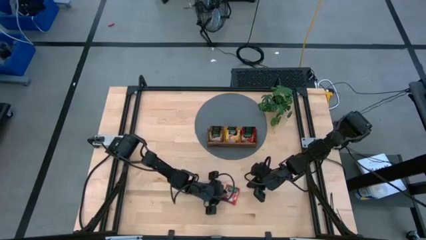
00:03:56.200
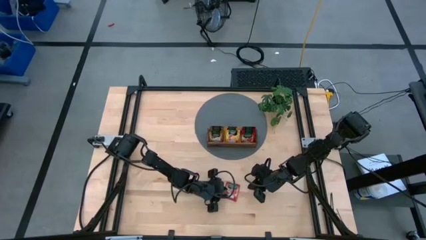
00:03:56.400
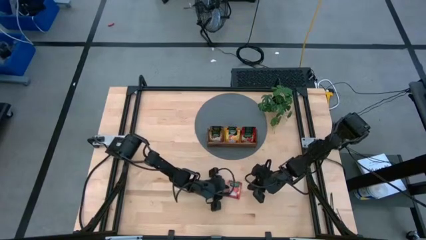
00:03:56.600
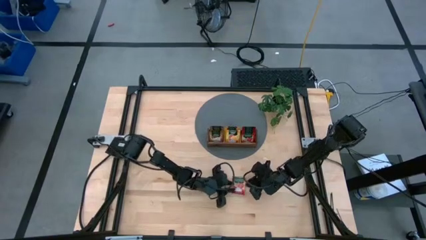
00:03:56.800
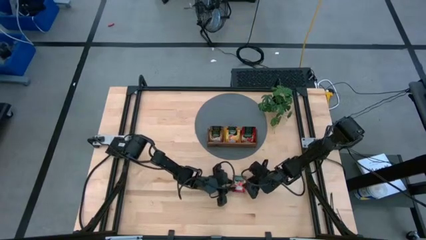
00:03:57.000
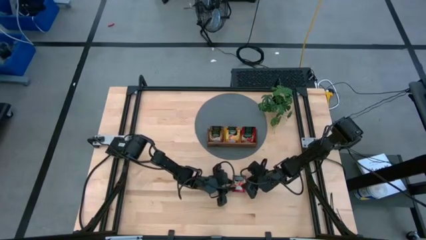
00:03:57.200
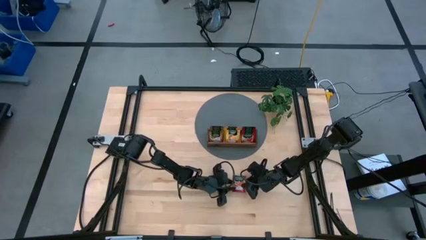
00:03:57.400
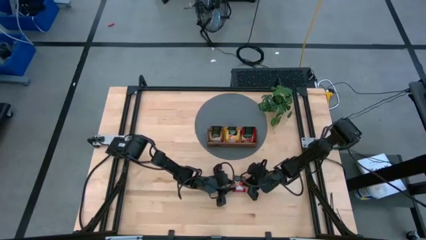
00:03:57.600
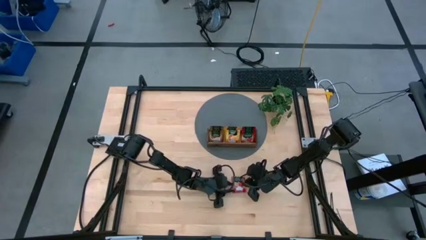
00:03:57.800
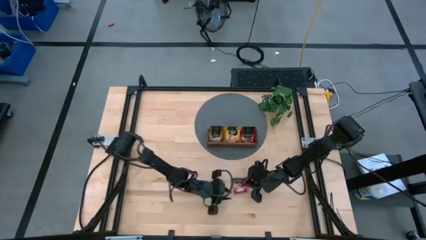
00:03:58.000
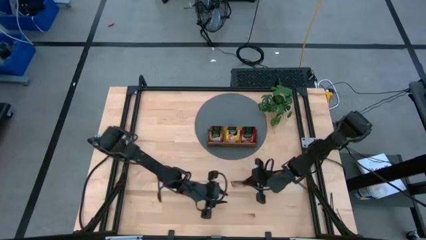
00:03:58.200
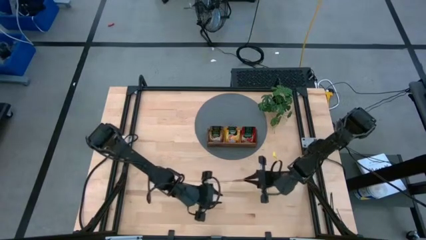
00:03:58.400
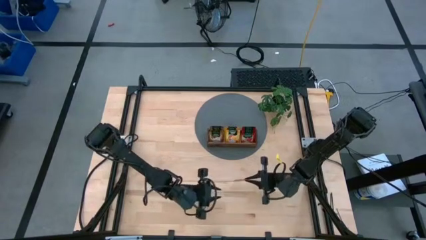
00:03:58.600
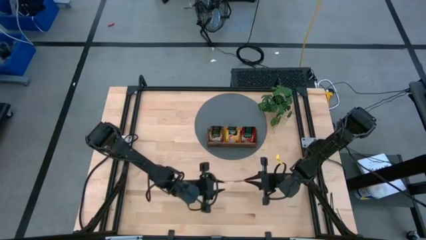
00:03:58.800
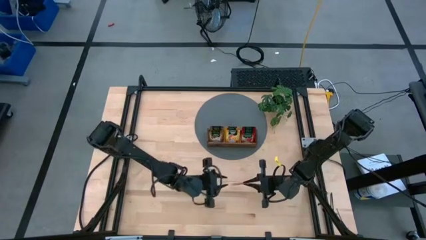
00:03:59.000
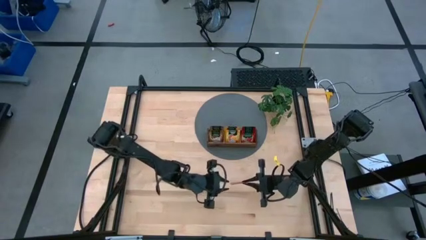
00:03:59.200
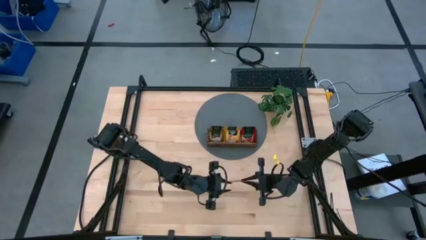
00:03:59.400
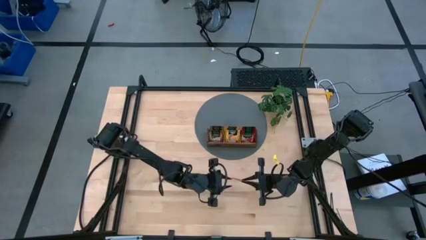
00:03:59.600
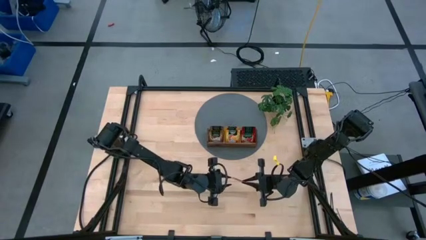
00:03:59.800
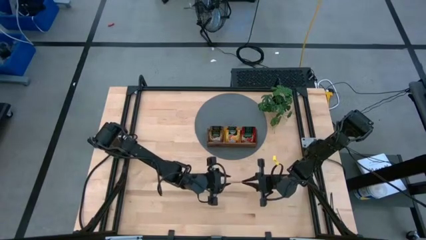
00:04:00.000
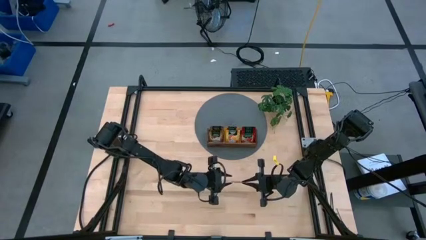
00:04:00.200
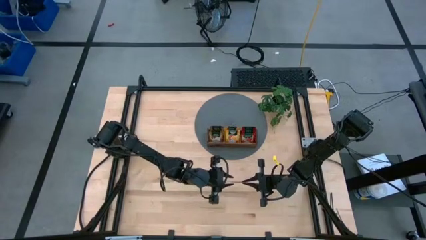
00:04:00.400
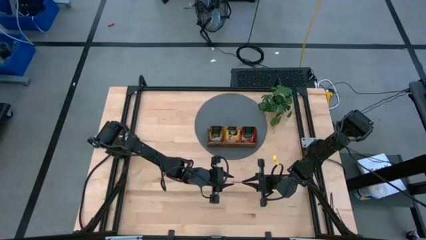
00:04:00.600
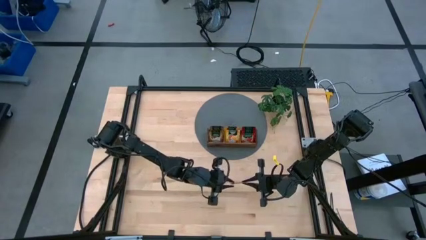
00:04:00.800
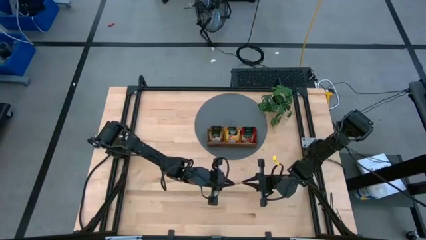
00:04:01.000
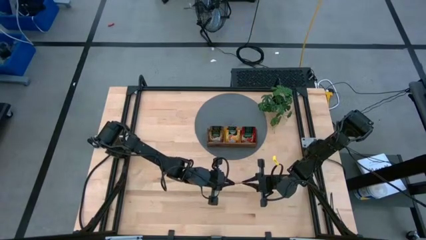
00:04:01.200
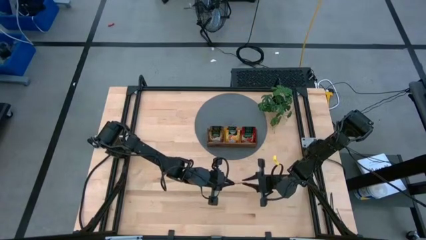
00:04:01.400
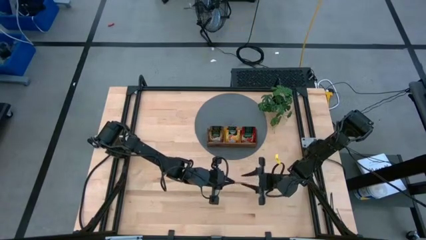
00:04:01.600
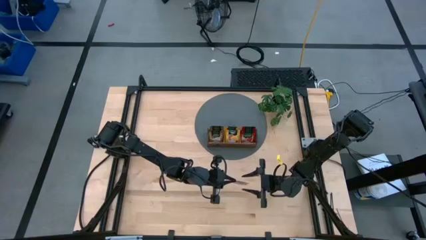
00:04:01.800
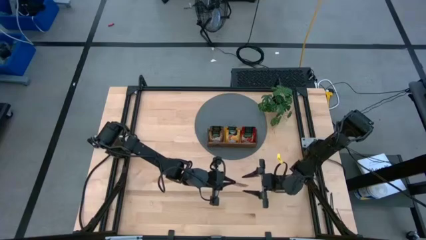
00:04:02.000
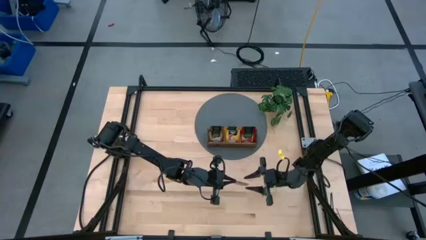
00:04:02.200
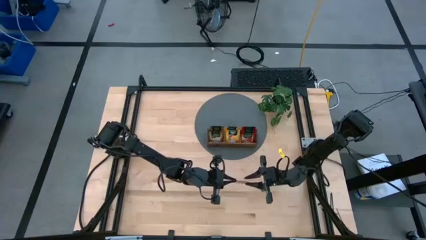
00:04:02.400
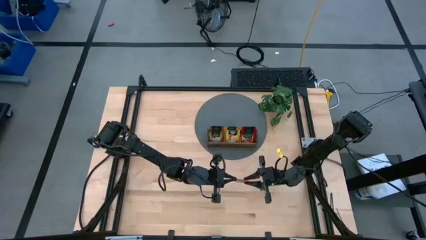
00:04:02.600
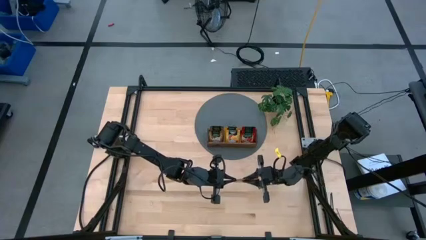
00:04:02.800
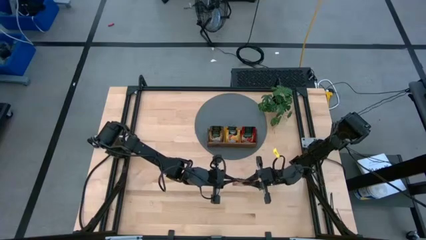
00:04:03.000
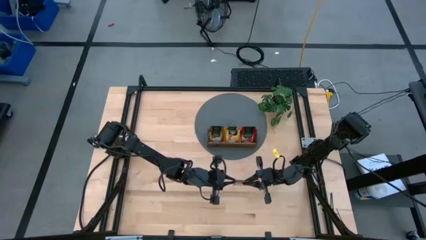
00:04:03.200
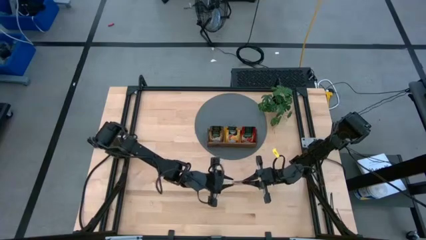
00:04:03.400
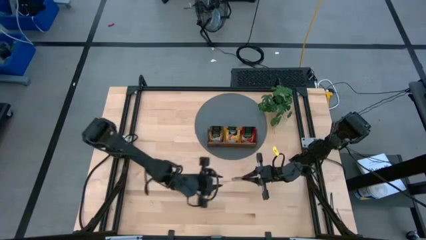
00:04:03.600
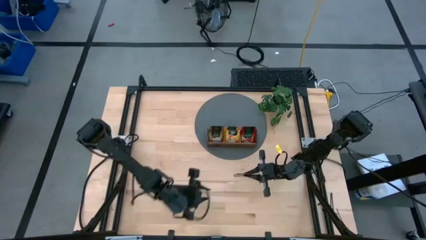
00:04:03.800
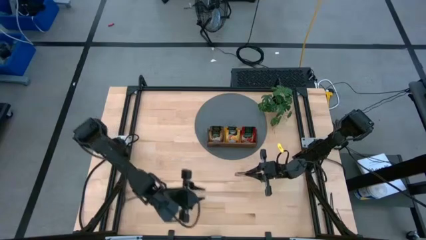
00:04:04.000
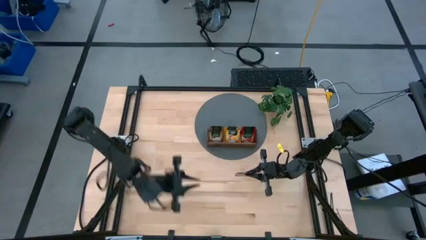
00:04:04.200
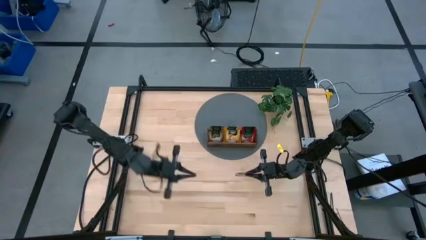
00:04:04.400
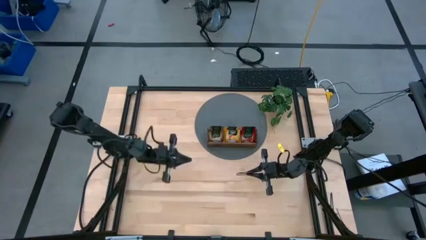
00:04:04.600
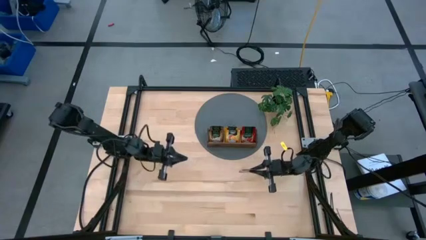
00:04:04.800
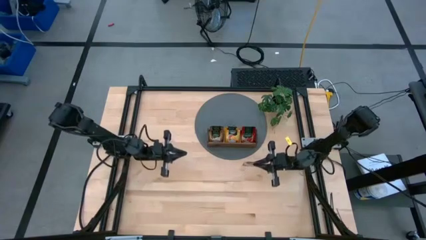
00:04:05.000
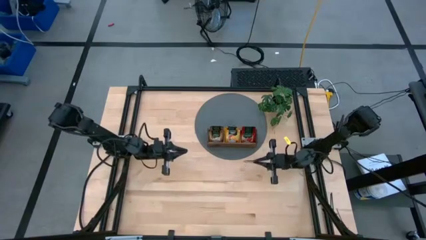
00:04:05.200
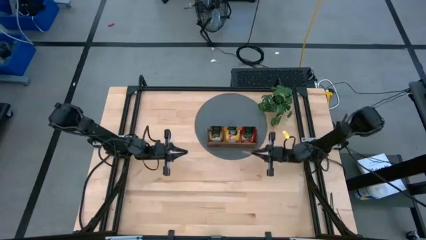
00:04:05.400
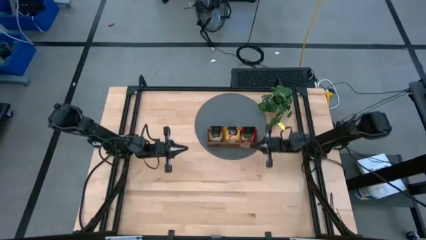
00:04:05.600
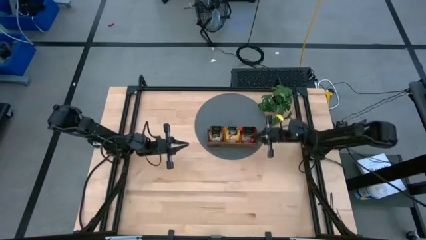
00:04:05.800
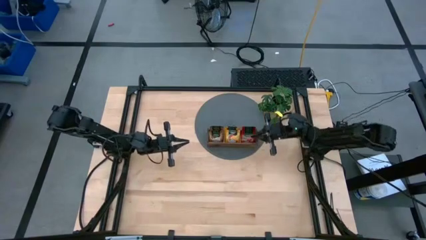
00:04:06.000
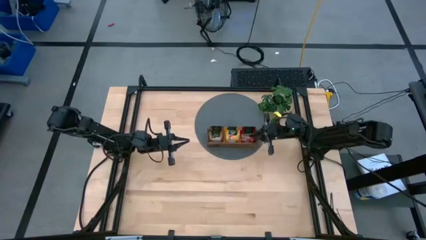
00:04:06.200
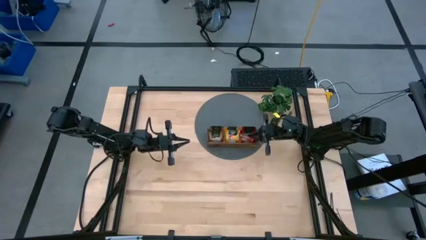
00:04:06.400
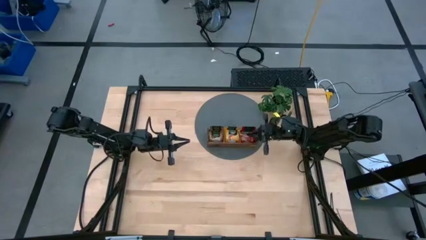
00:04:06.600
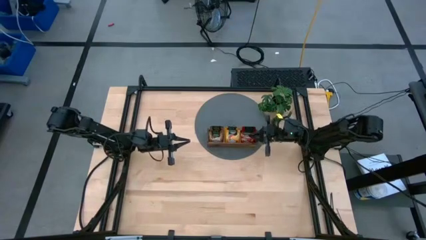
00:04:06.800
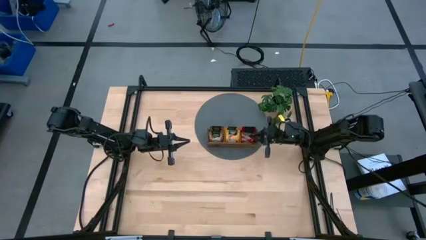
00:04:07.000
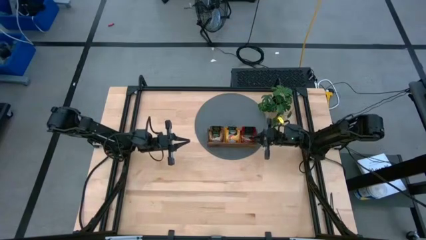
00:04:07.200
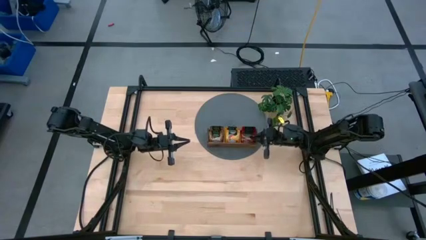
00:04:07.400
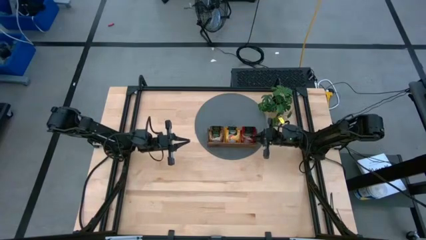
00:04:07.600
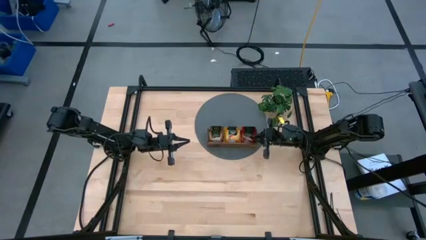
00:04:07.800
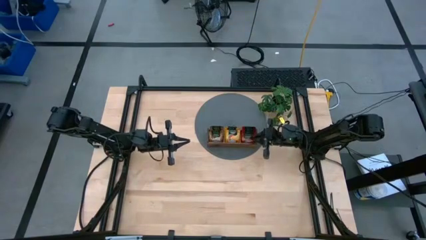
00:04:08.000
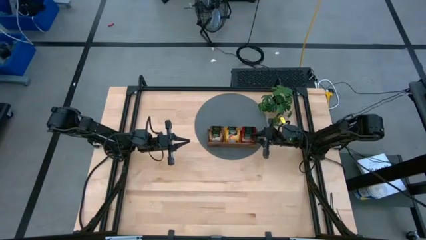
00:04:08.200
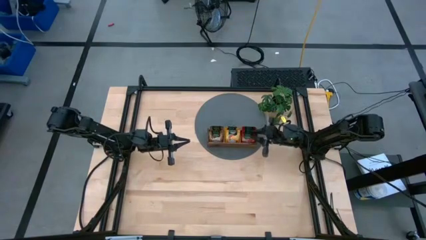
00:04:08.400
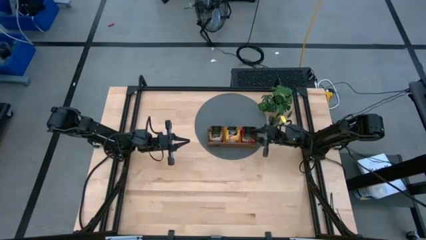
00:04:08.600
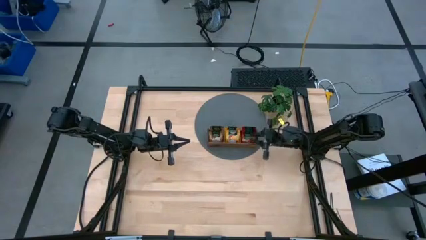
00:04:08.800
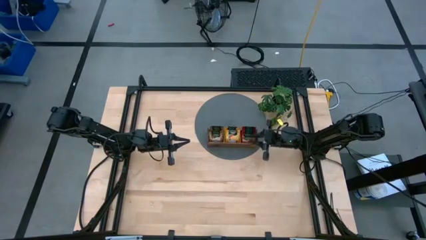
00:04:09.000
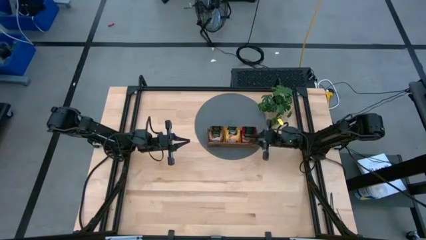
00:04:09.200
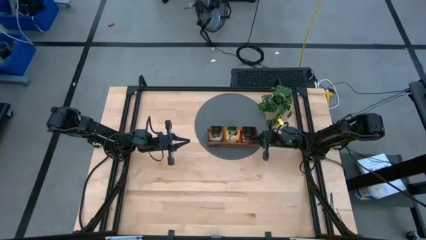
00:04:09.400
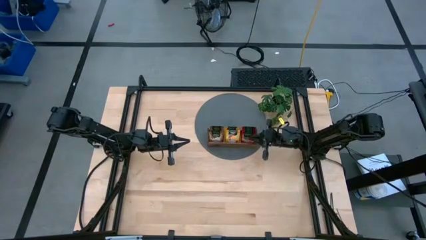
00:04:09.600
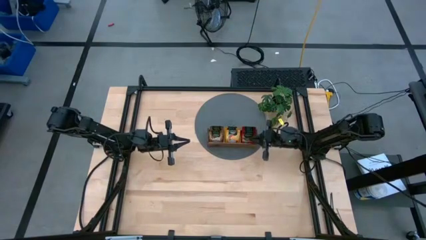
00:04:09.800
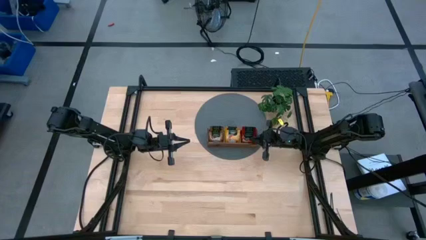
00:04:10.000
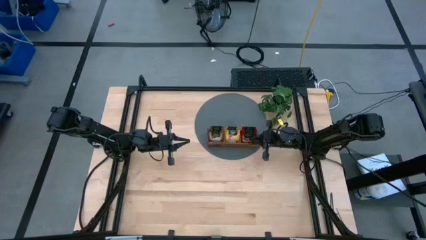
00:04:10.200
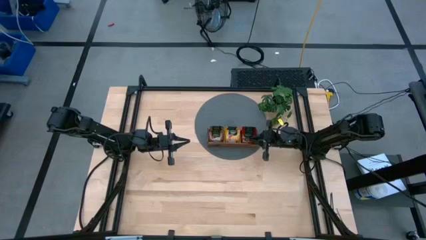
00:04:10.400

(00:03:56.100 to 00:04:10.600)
Task: Pick & Place Tea
Put the red tea packet into the right section of the wooden organizer
